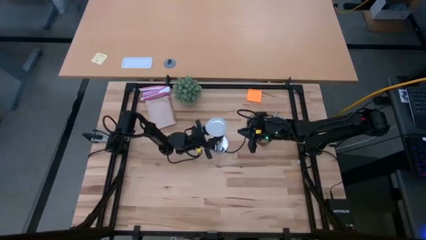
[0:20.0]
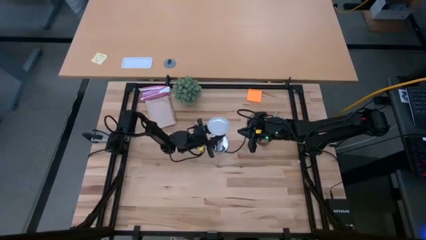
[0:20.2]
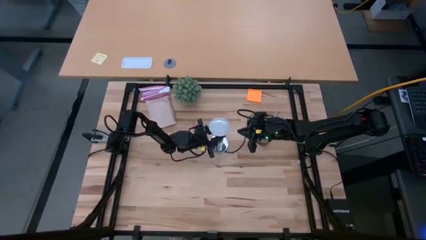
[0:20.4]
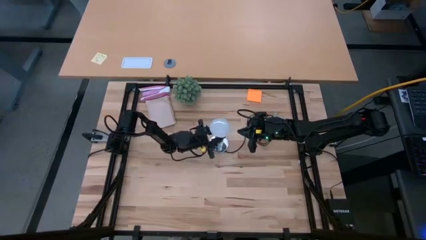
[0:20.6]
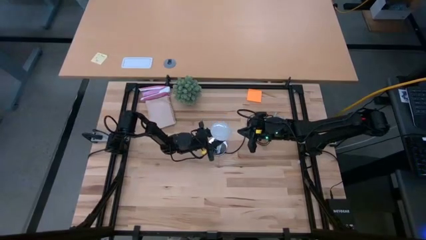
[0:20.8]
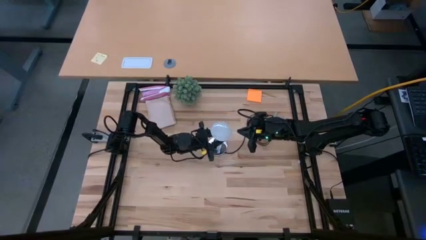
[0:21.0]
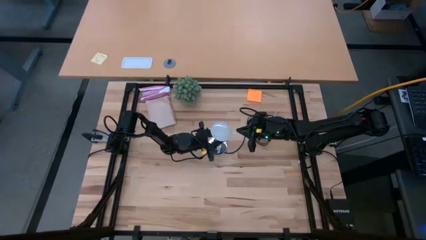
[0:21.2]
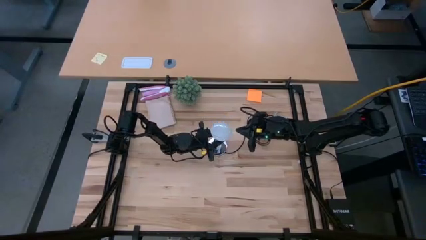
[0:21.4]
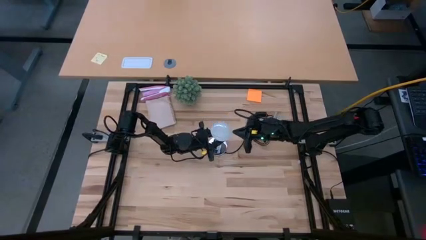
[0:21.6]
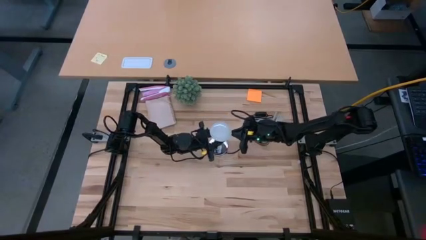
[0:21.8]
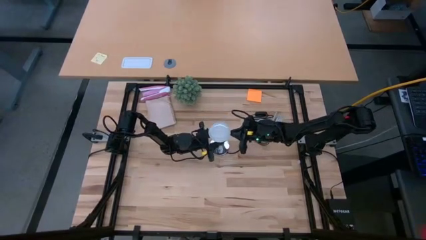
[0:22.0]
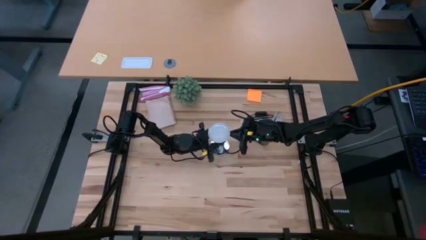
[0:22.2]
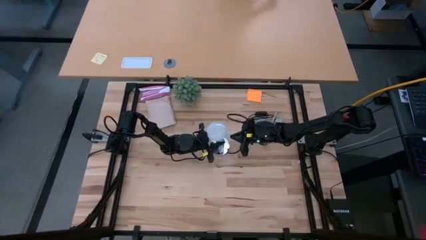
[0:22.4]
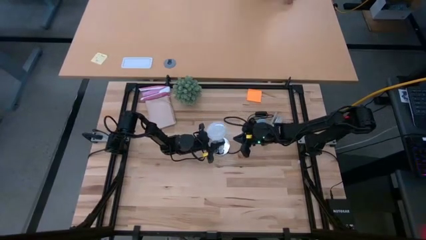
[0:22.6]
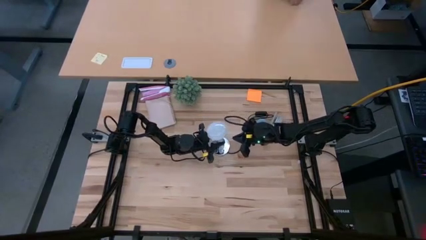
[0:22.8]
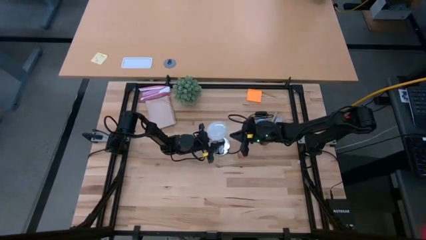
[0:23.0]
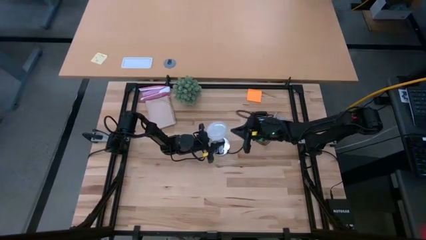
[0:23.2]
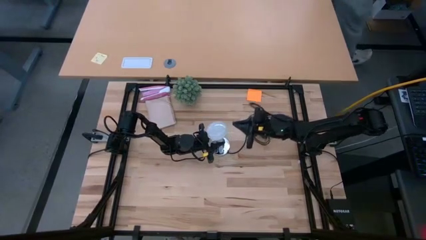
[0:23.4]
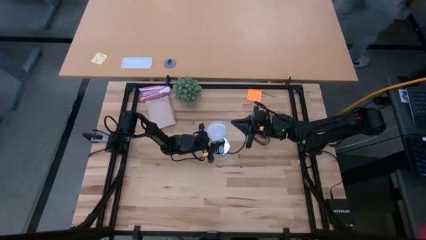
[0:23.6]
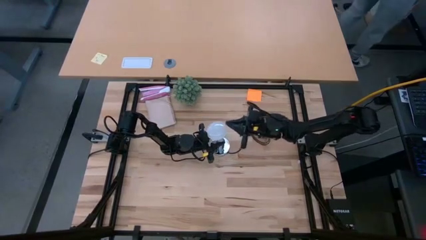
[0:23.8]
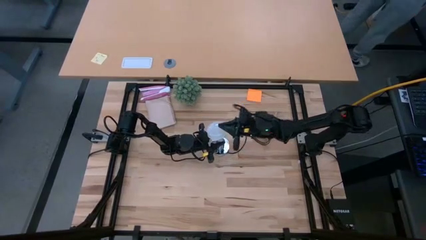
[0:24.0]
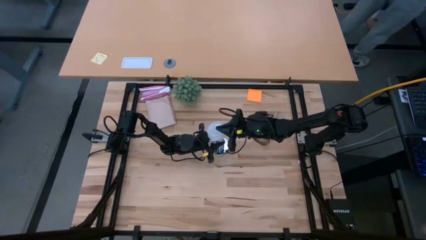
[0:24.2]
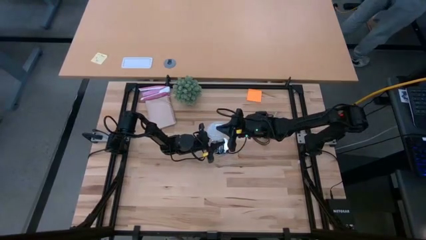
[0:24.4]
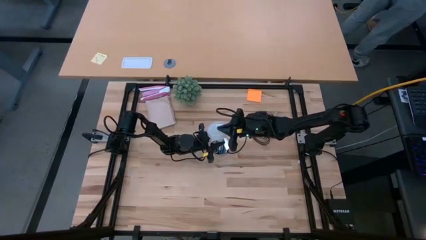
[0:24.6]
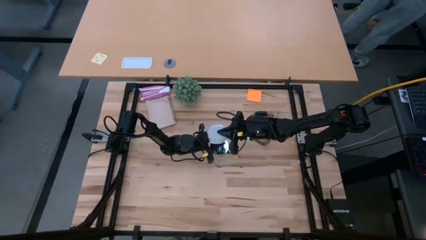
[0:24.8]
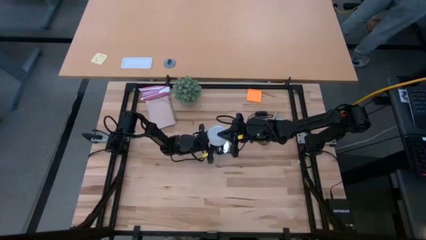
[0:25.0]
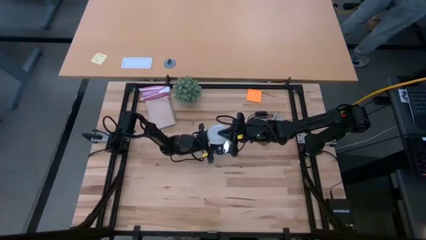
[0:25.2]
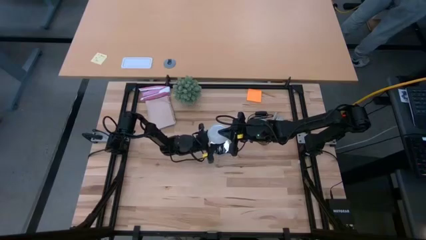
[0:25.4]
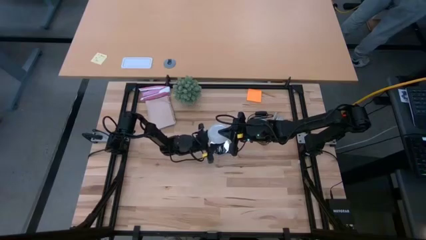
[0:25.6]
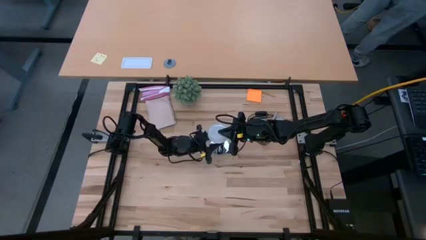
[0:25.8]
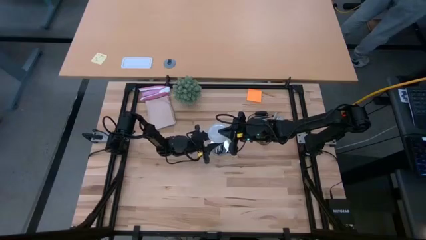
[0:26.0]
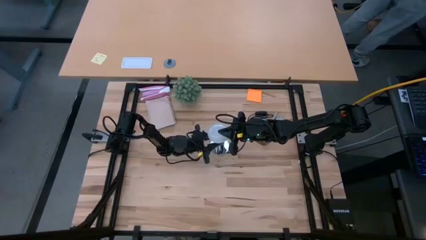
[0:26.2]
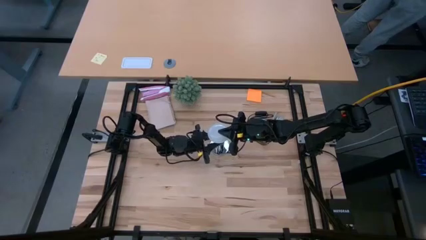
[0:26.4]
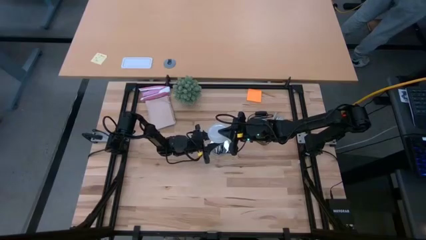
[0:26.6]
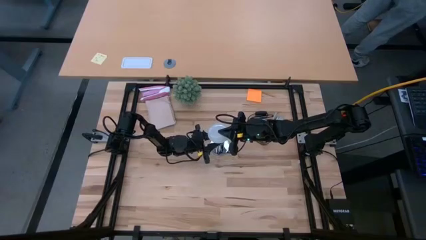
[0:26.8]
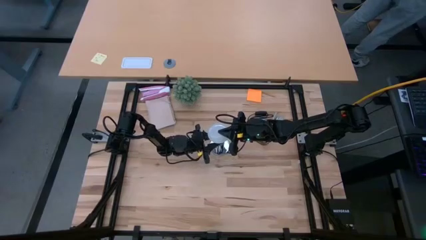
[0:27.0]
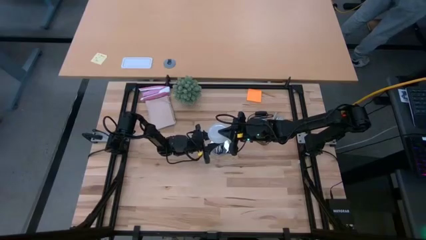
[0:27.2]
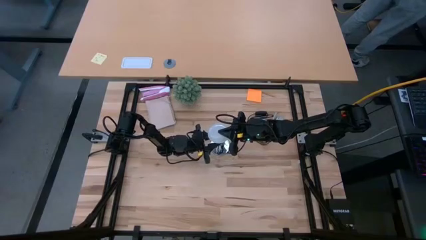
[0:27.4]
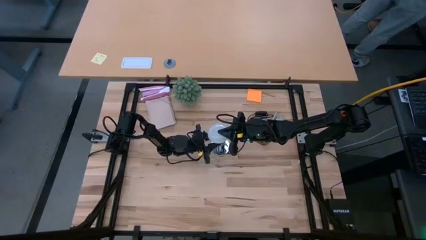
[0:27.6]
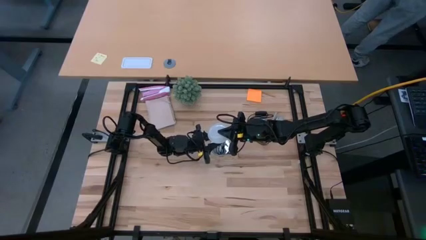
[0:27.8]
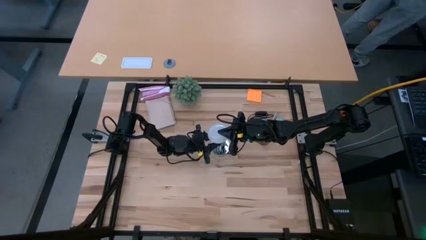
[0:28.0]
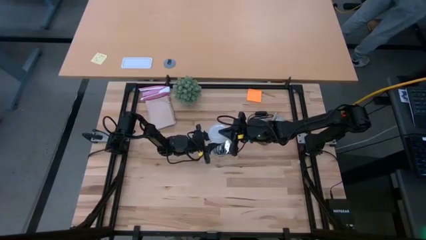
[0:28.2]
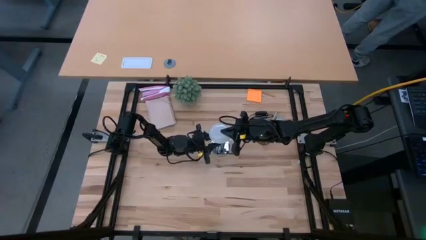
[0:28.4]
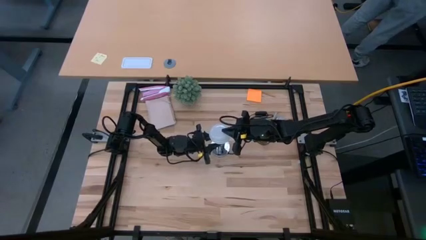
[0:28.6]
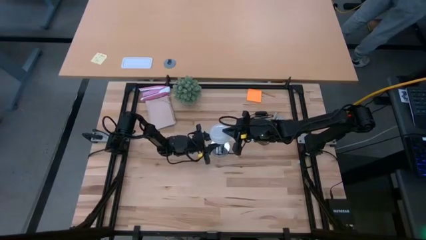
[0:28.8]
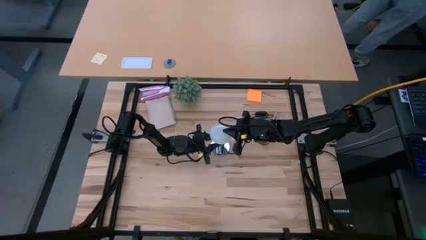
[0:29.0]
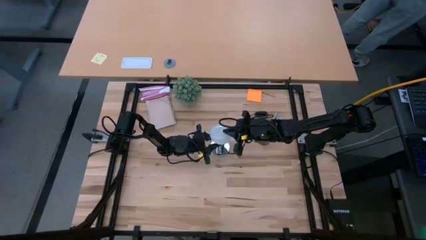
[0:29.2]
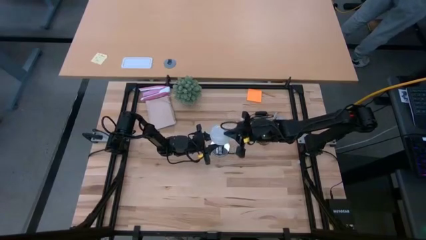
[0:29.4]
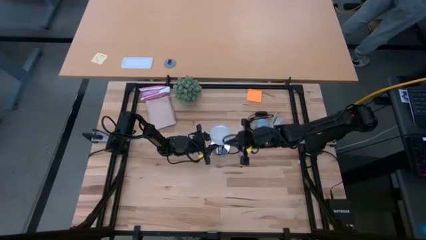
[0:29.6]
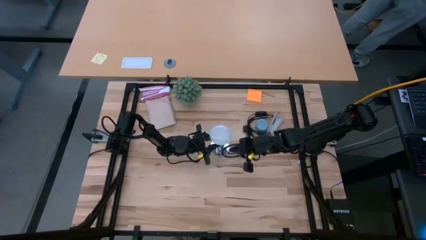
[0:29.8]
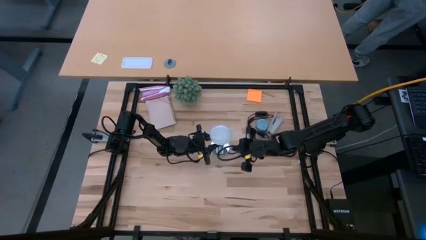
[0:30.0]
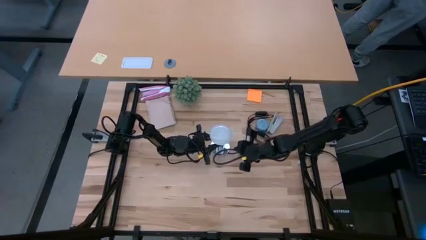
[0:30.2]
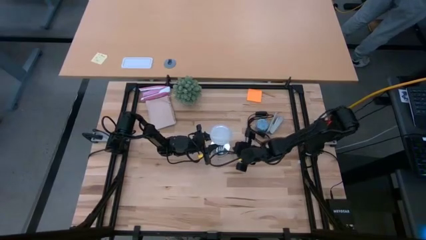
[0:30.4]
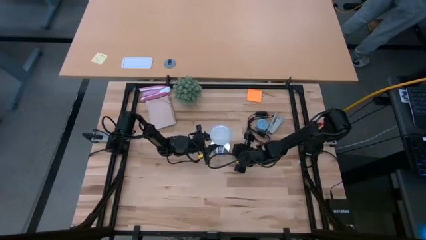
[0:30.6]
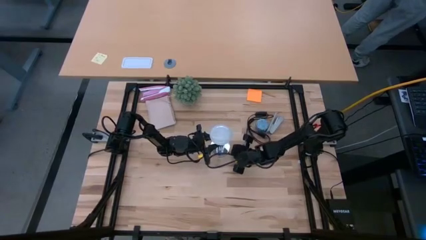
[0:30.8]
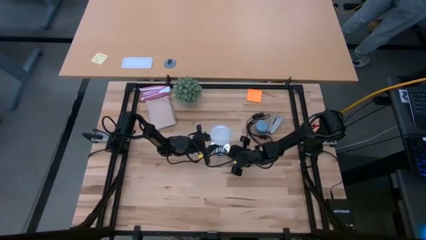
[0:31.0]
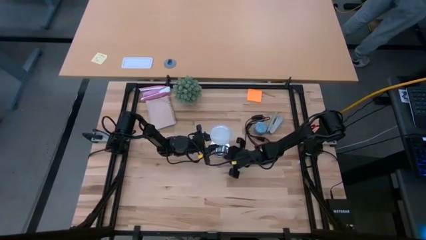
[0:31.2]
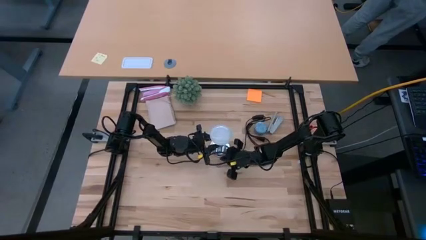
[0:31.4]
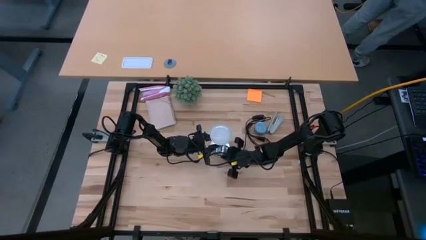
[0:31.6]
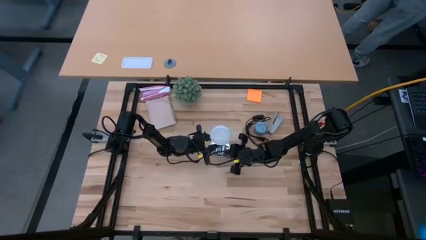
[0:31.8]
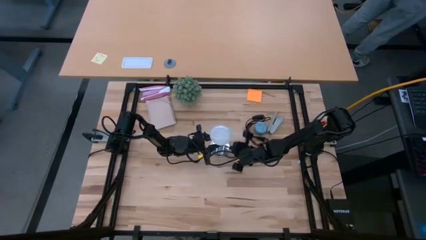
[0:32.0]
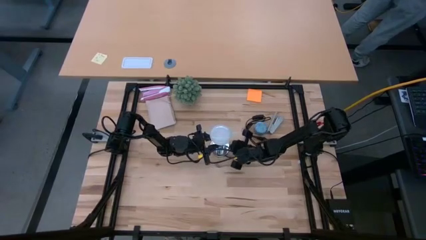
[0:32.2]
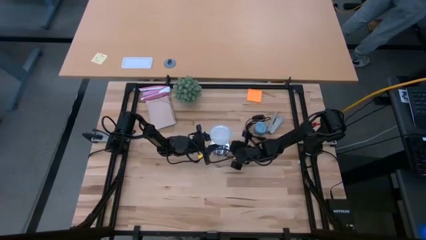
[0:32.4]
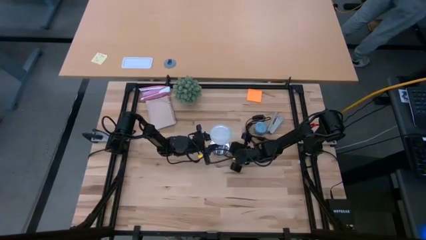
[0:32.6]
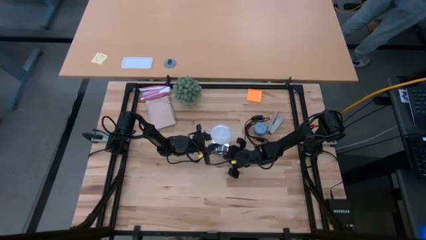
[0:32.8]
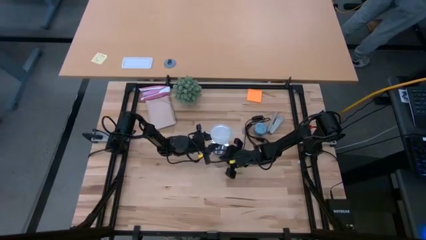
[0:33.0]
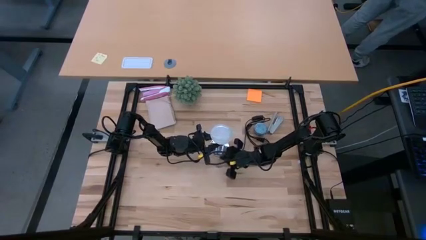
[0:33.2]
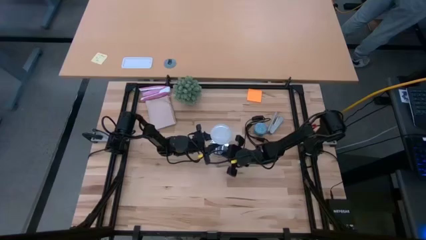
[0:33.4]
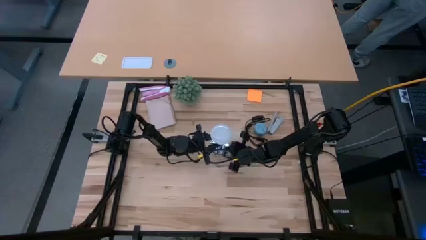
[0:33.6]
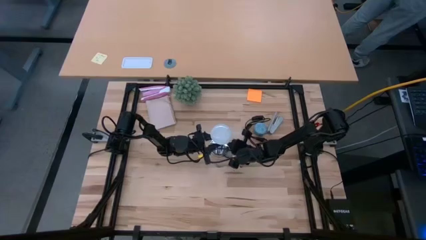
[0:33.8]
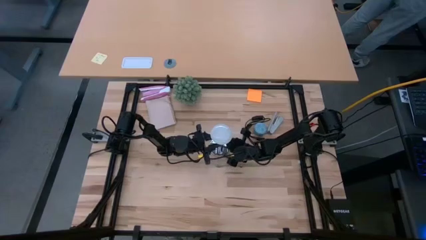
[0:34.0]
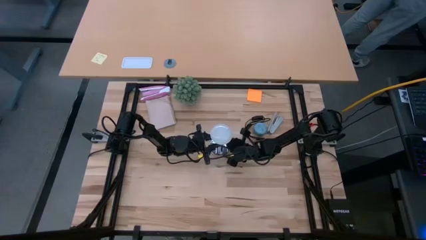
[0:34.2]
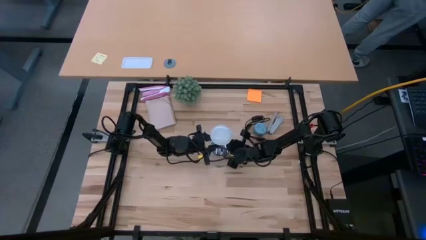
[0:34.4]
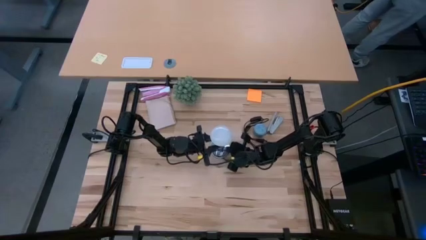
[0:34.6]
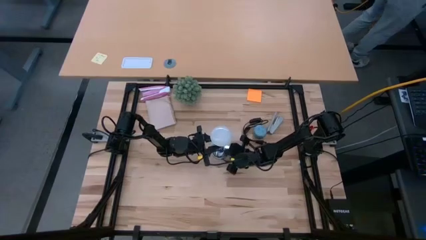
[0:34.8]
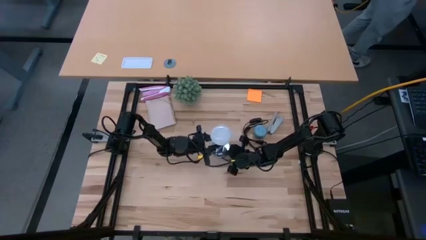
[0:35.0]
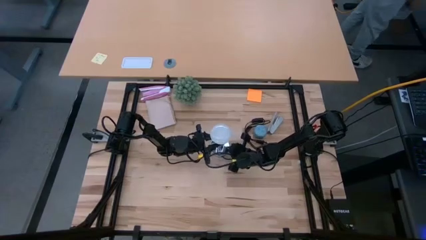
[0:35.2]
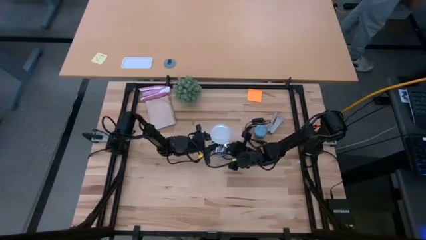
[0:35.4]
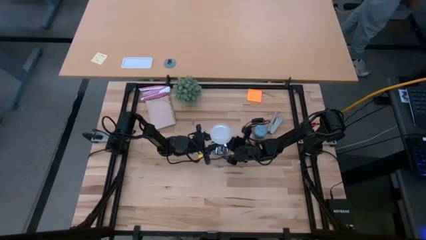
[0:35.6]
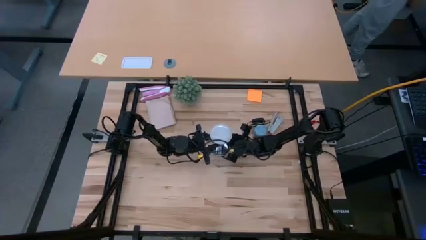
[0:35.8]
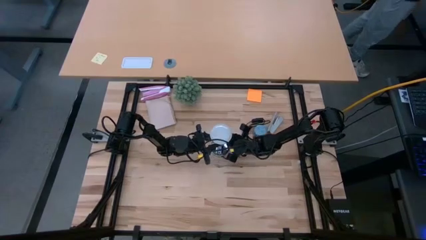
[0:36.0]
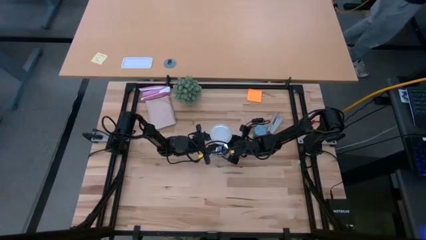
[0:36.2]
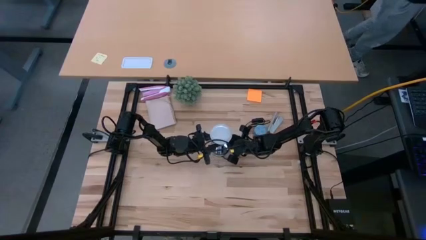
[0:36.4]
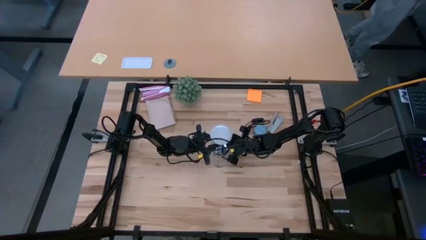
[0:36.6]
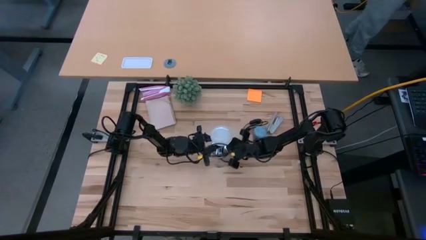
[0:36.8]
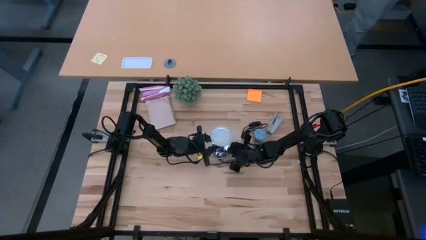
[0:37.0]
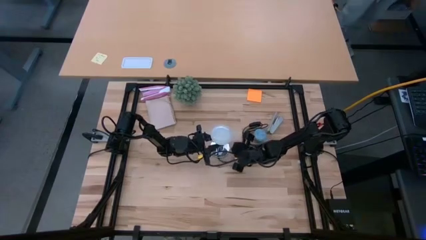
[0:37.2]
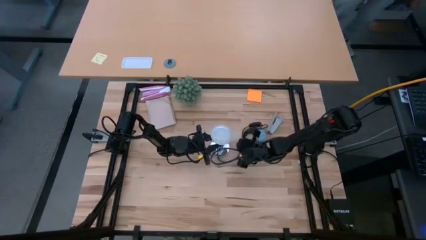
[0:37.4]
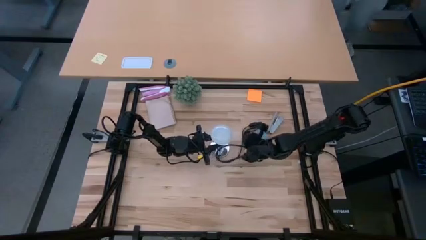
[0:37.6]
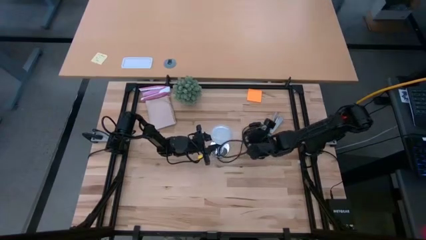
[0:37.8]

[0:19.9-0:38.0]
Task: Screw lightbulb
Insert the lightbulb into the lamp
